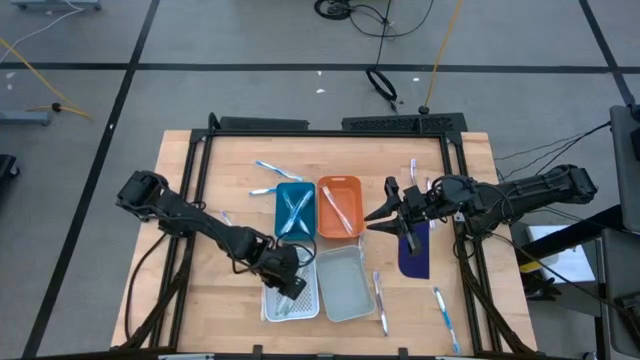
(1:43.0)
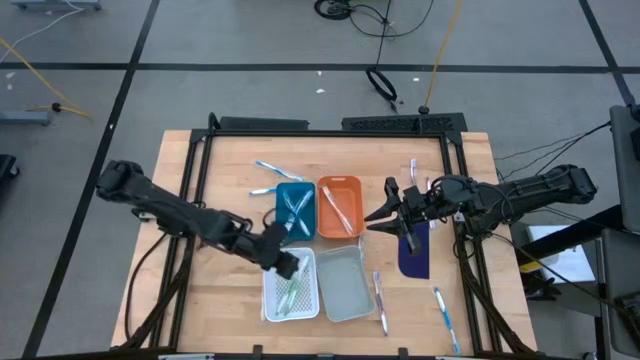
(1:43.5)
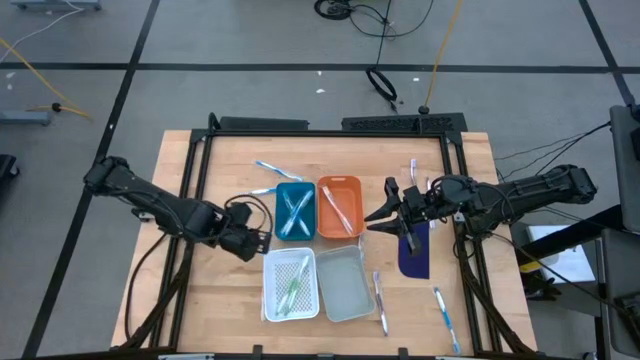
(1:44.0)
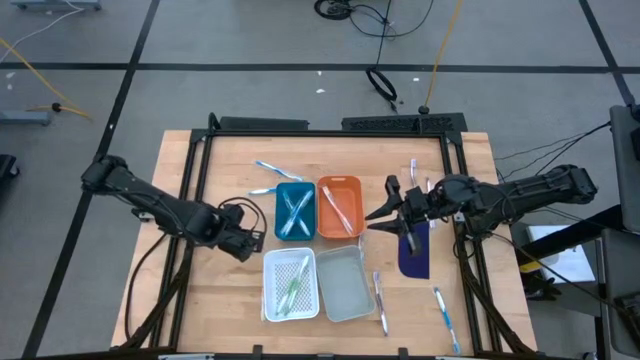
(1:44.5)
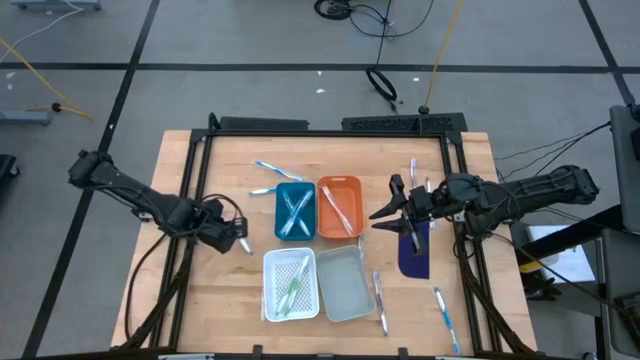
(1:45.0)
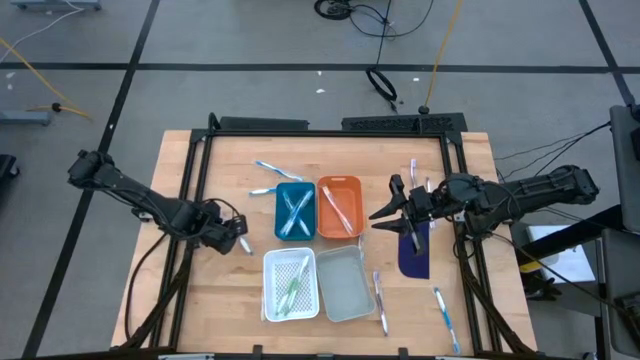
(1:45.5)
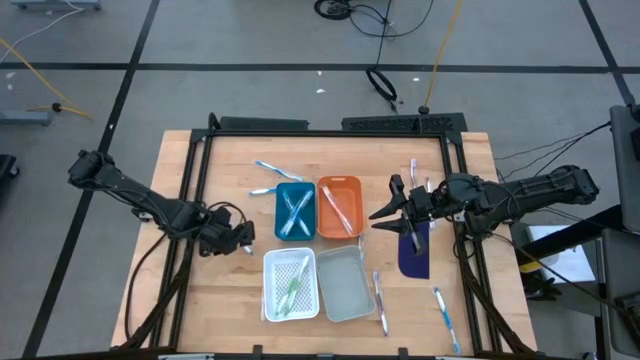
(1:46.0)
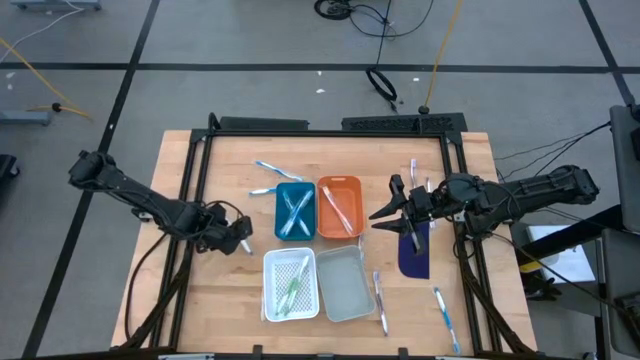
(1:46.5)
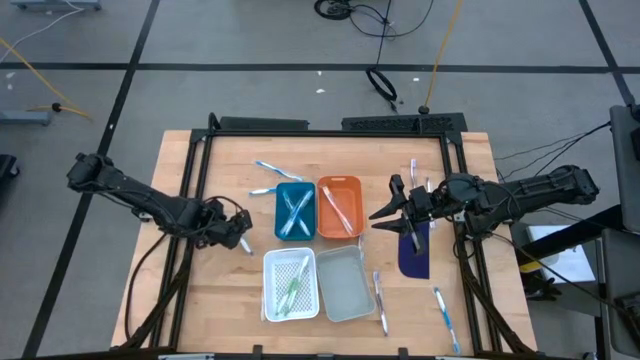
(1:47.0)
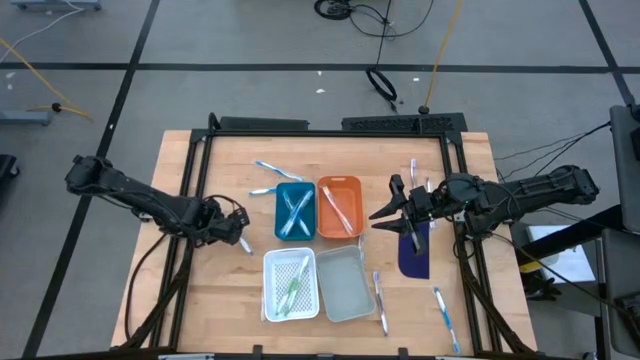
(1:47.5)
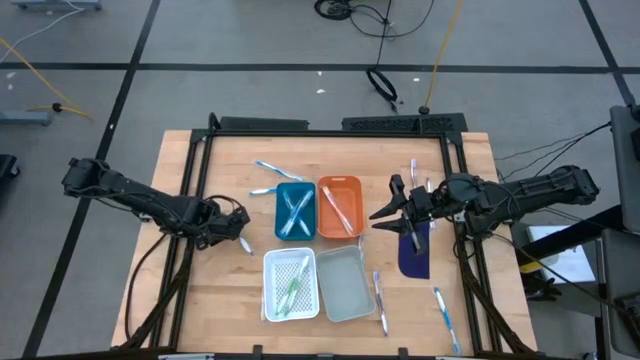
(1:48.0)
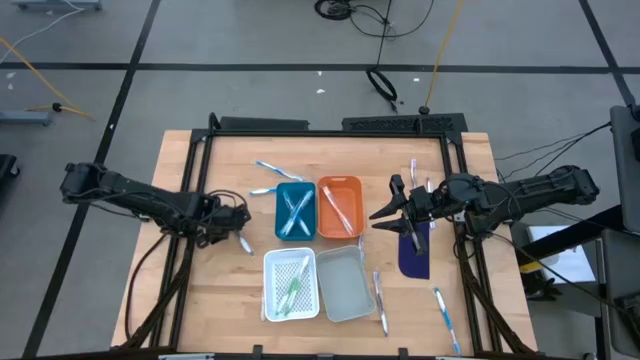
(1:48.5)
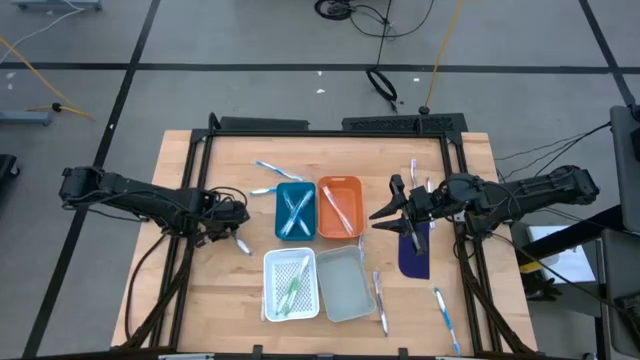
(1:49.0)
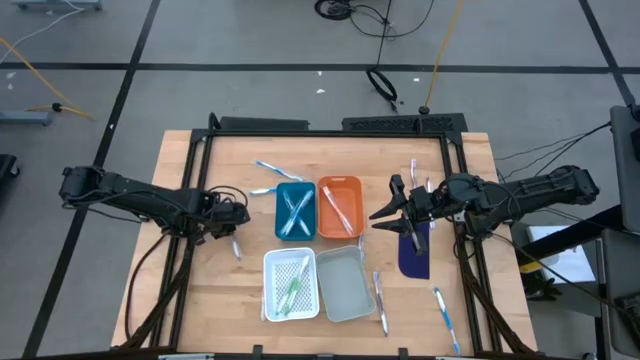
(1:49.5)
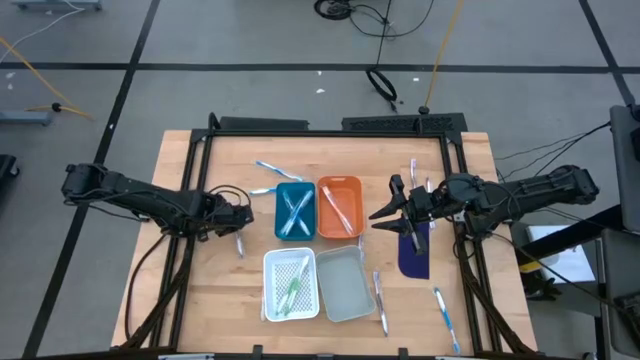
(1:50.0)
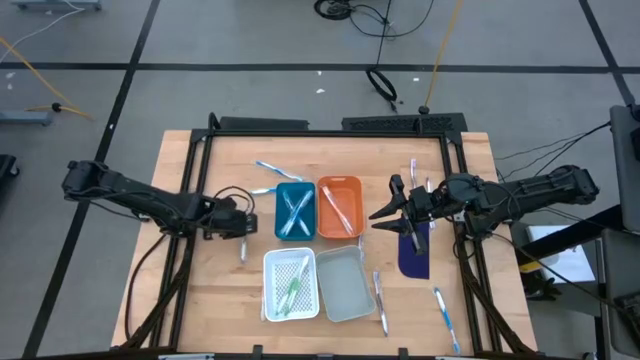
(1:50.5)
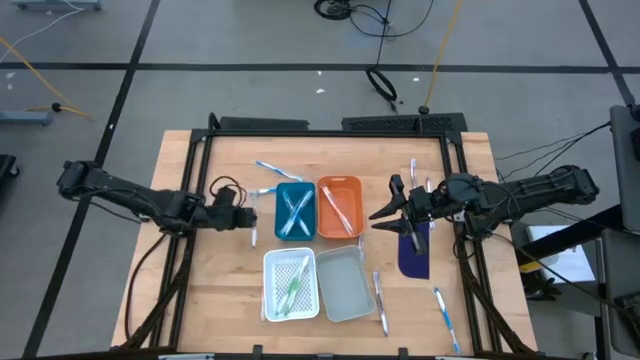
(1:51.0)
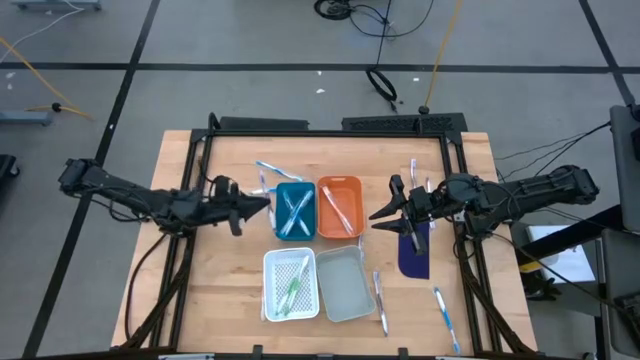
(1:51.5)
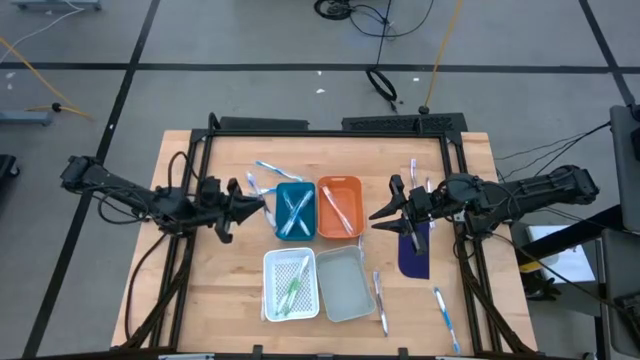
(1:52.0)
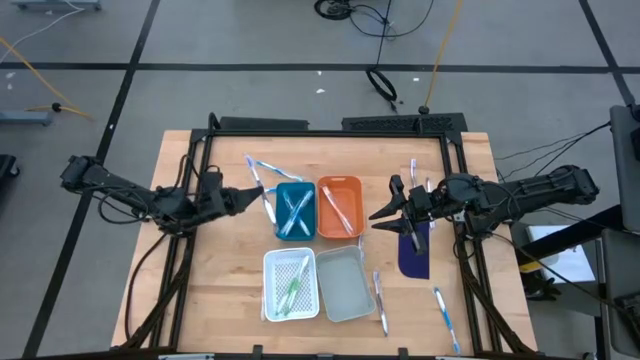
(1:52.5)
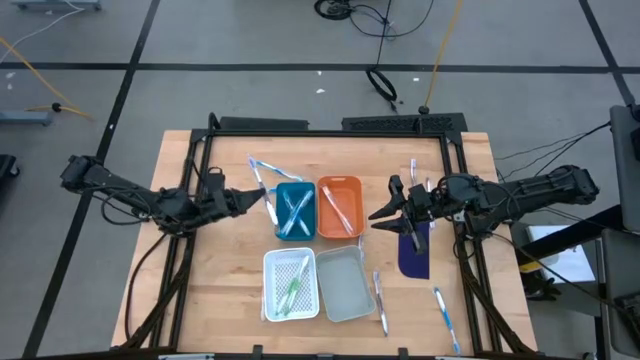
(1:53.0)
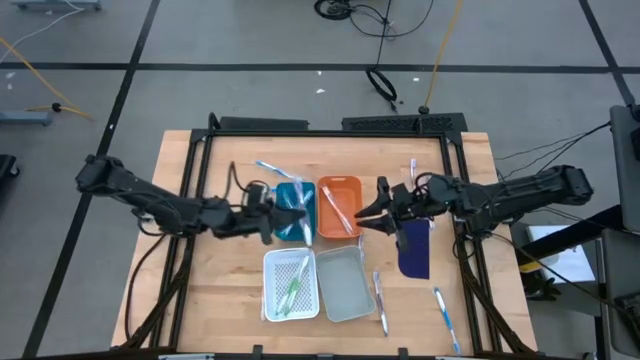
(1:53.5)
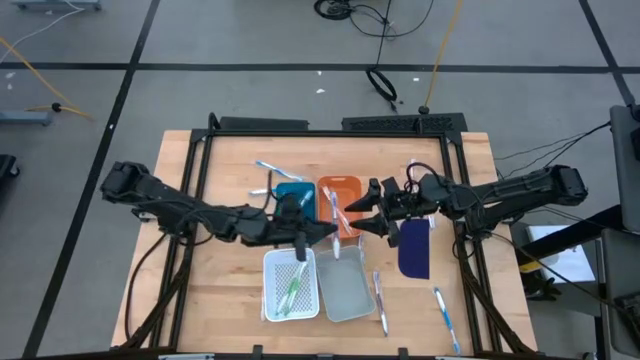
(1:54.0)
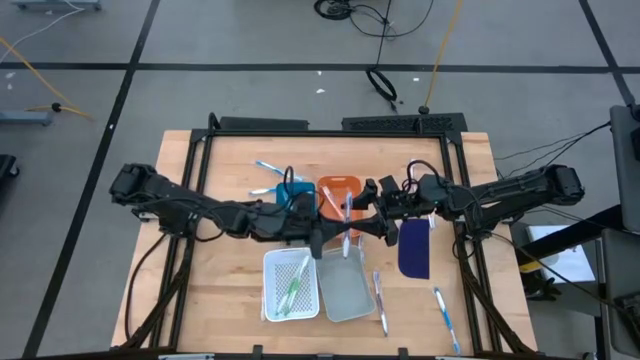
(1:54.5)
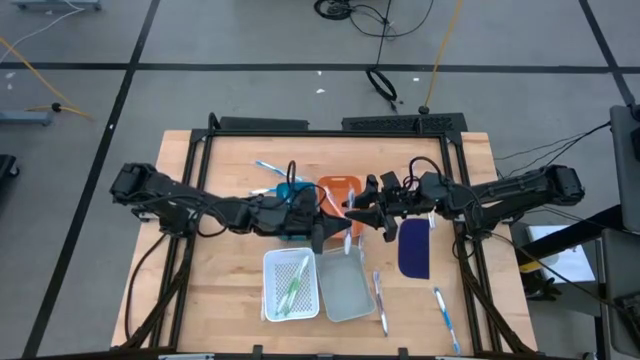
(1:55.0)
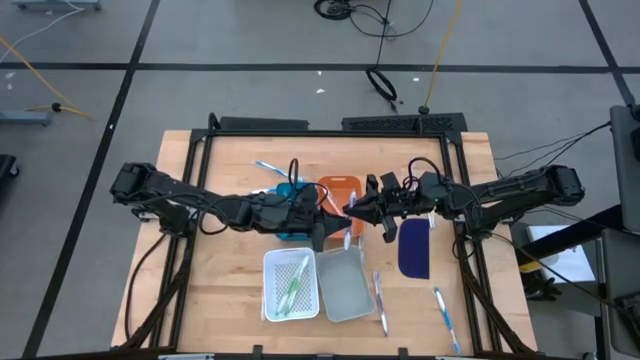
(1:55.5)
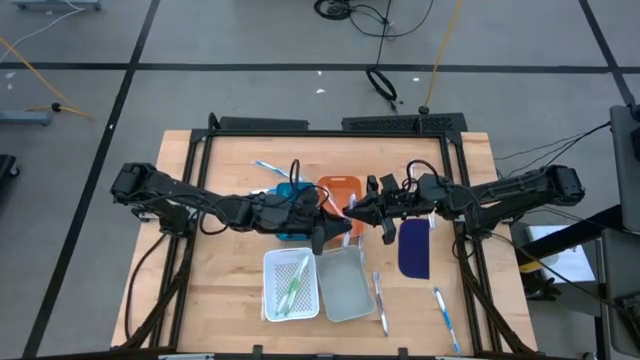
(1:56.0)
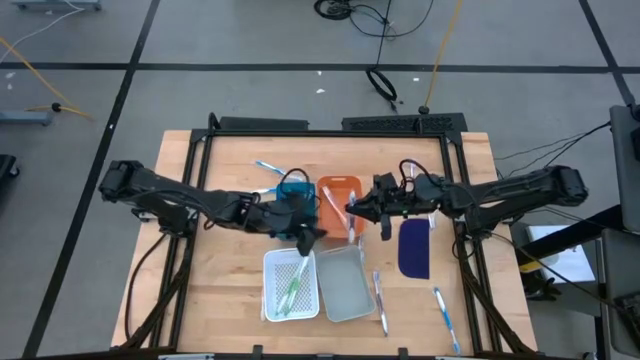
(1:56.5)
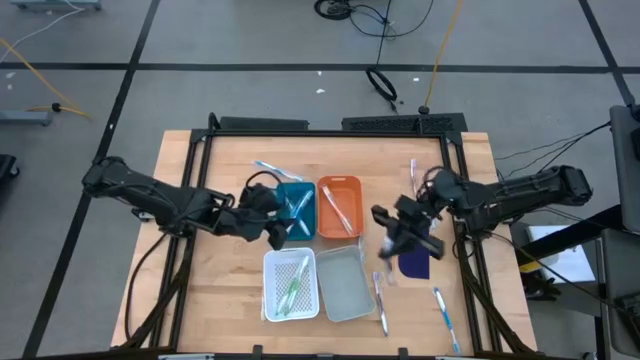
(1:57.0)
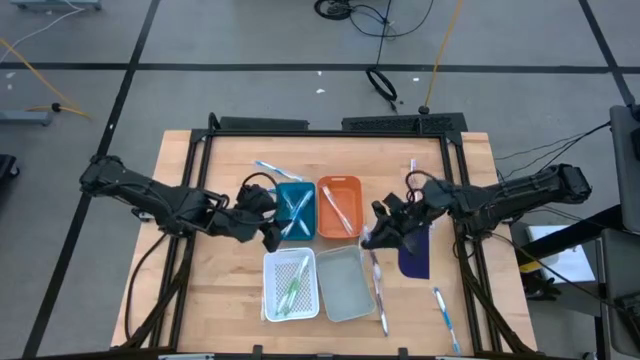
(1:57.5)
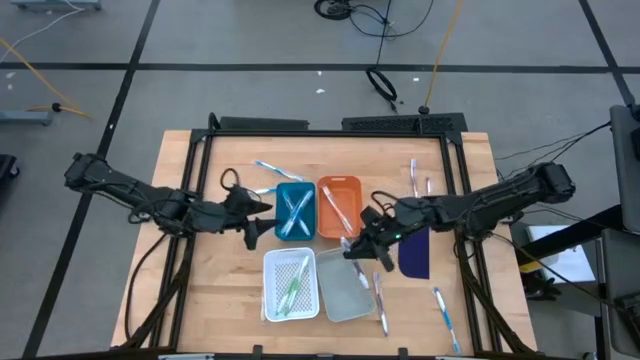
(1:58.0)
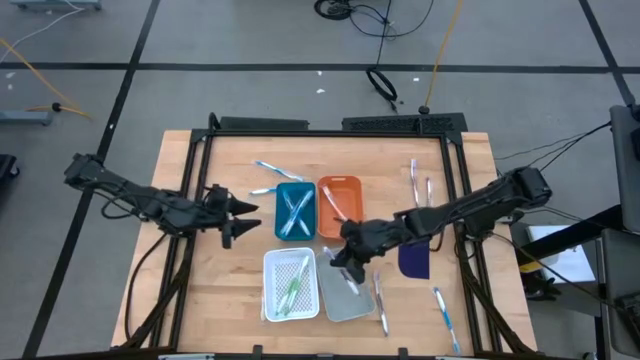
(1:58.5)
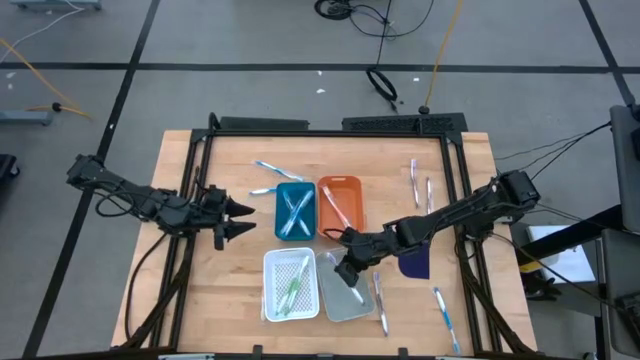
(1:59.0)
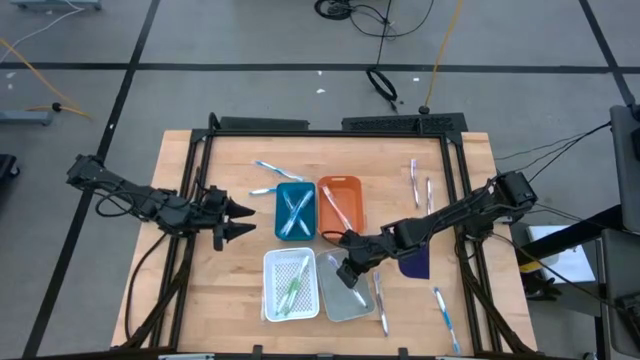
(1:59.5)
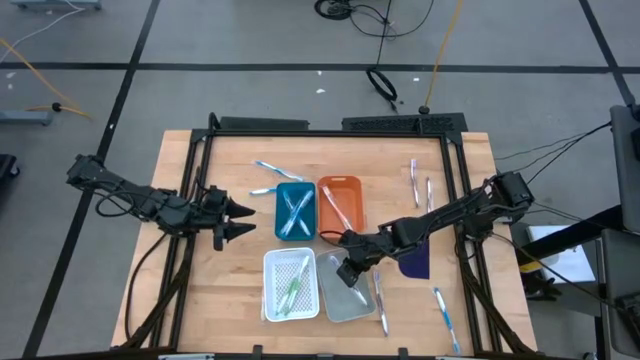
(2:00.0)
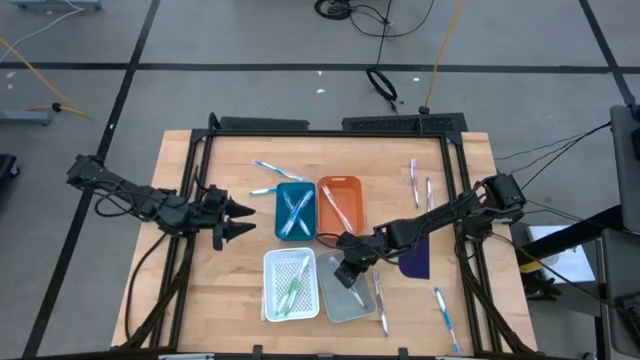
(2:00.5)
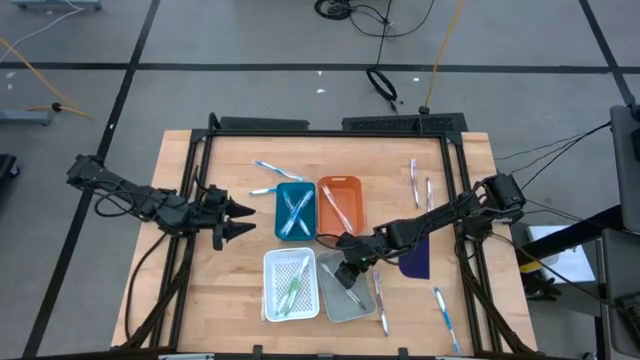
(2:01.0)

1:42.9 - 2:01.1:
Task: Pick & Place Toothbrushes
Put the purple toothbrush into the gray bin

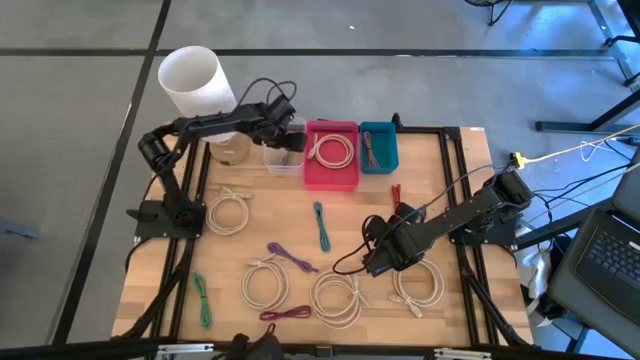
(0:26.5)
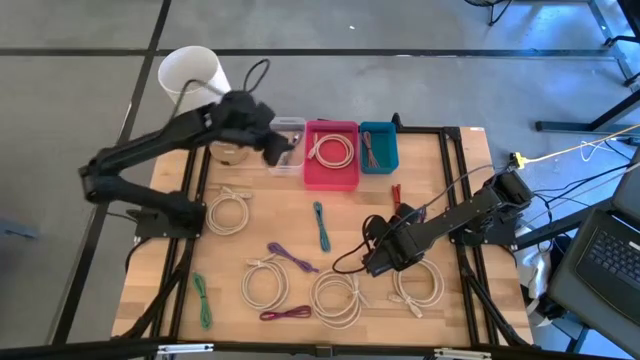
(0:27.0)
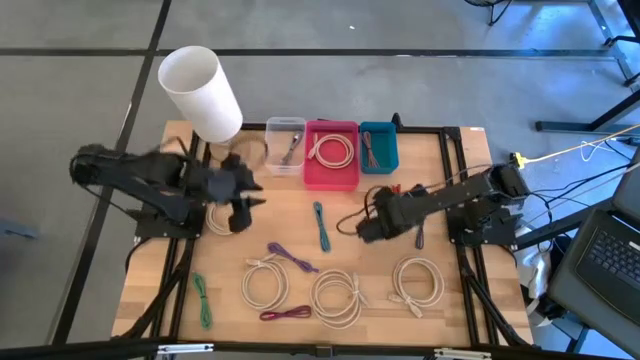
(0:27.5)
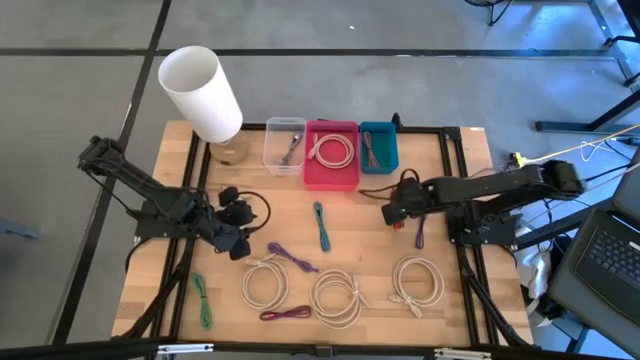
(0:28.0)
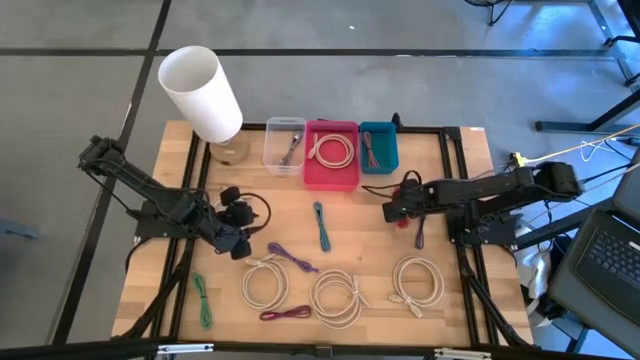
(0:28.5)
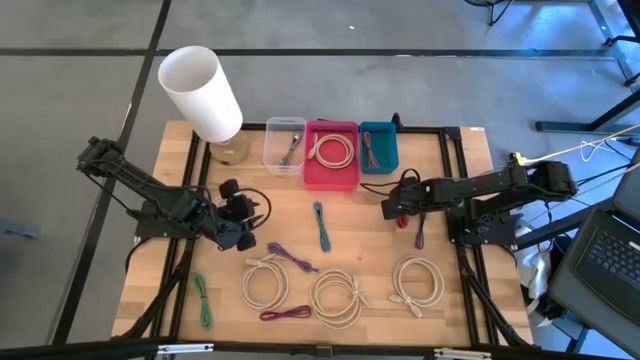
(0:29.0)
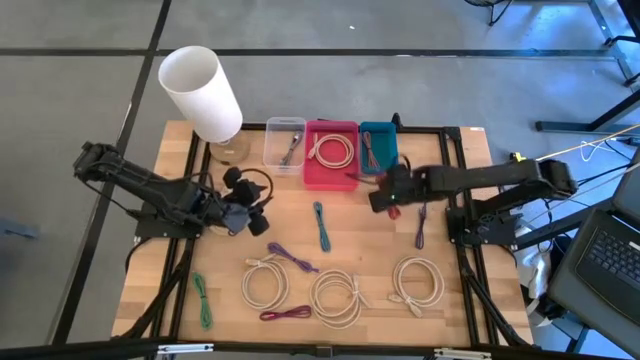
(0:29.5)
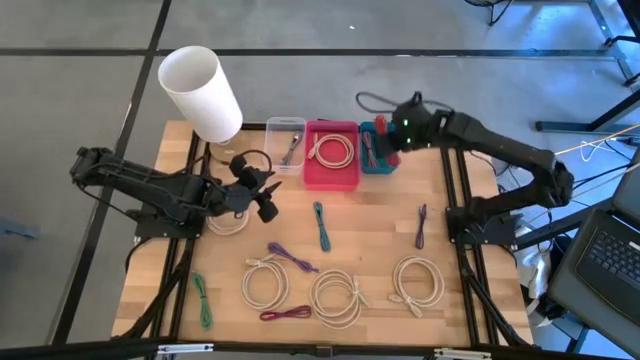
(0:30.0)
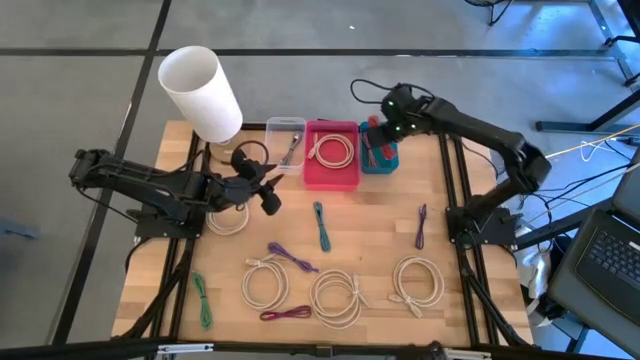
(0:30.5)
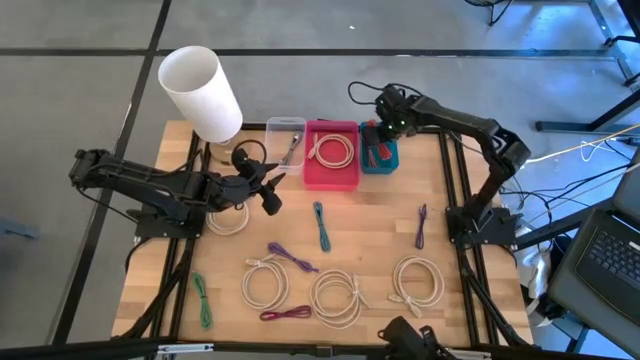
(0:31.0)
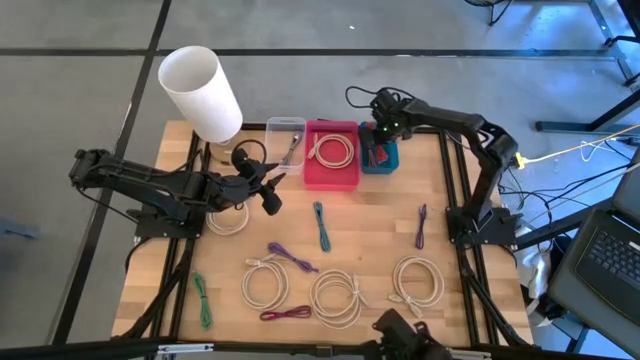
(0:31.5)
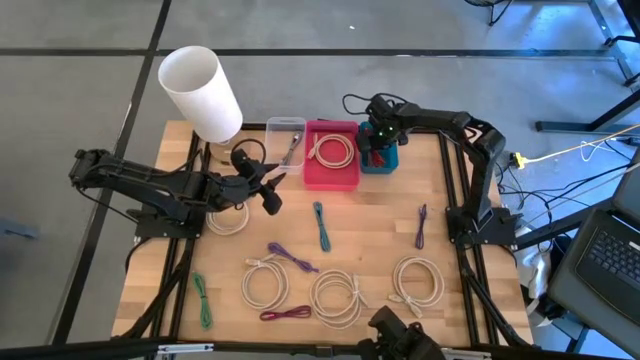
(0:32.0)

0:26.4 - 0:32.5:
Task: Pick & Place USB Port
Put the red charger cable into the blue bin
